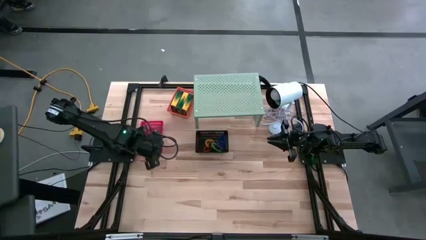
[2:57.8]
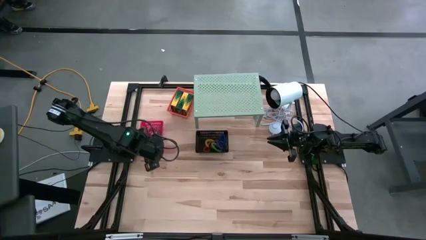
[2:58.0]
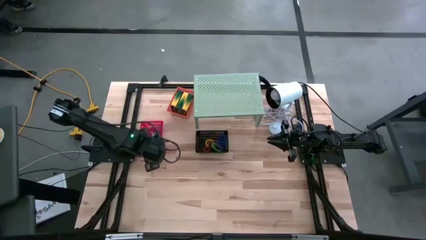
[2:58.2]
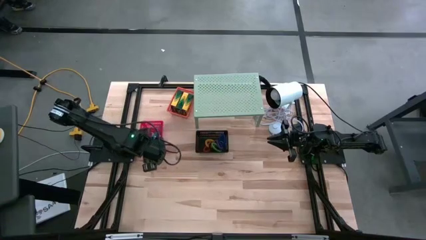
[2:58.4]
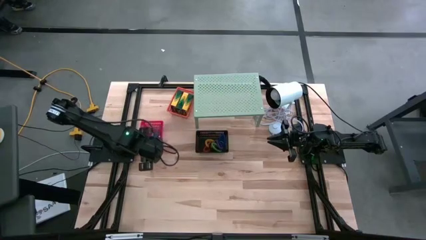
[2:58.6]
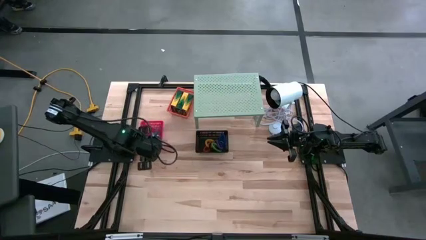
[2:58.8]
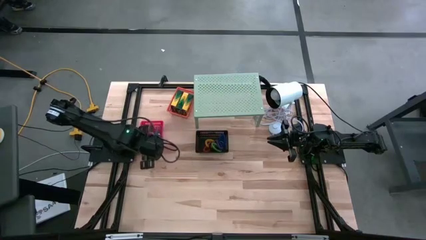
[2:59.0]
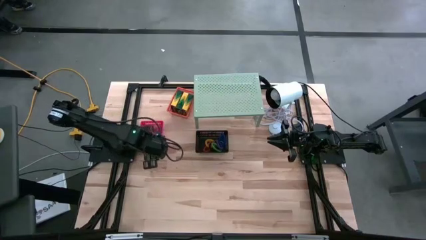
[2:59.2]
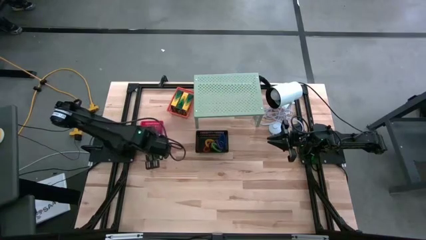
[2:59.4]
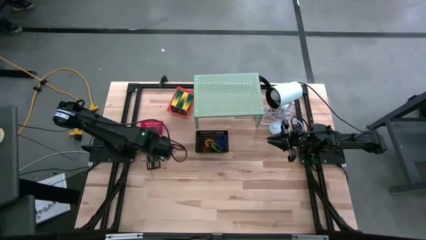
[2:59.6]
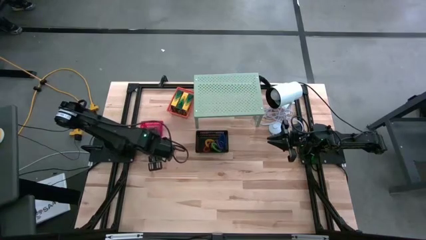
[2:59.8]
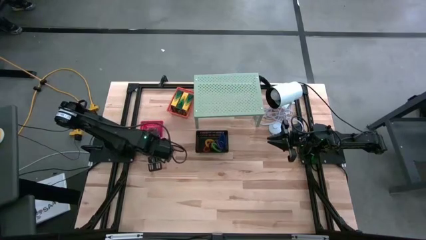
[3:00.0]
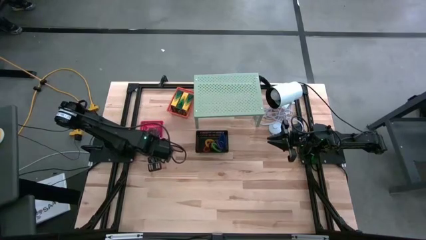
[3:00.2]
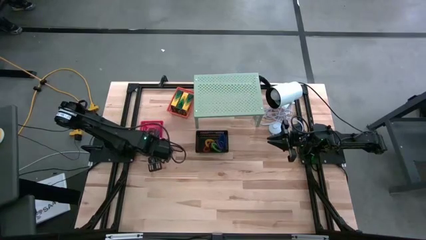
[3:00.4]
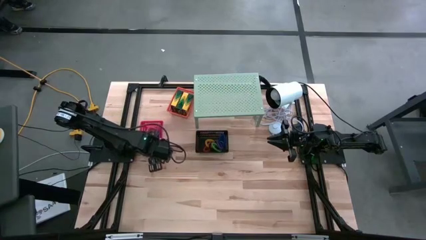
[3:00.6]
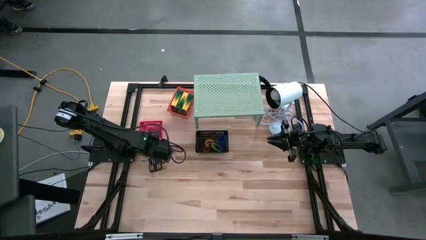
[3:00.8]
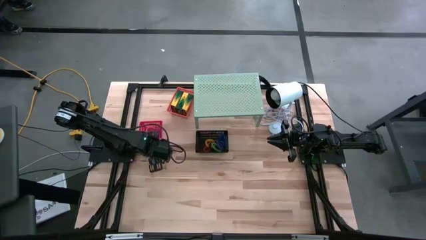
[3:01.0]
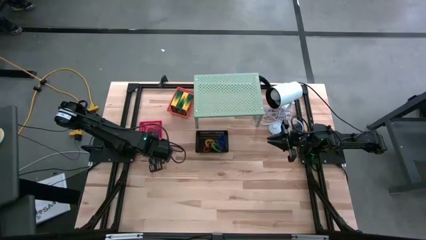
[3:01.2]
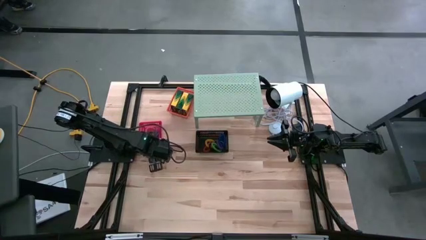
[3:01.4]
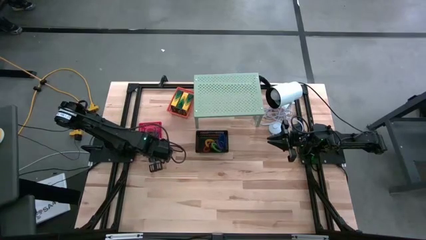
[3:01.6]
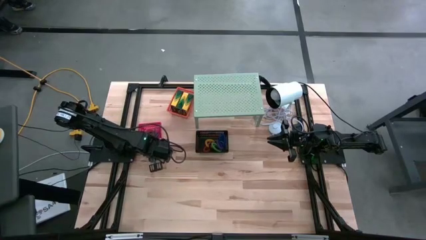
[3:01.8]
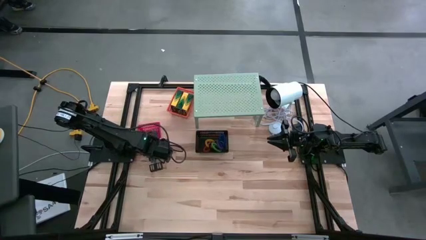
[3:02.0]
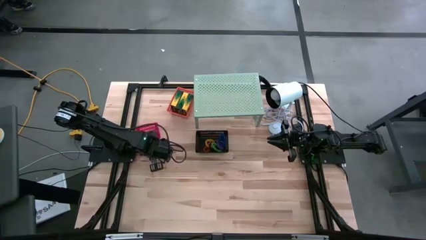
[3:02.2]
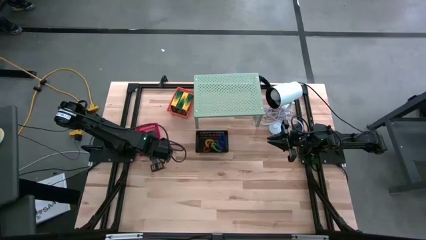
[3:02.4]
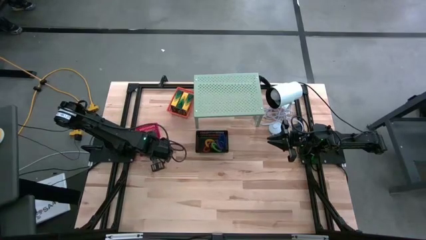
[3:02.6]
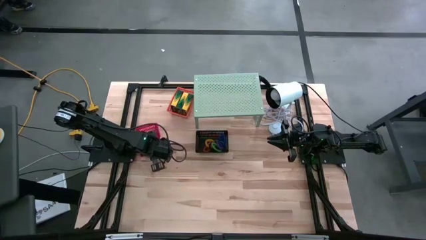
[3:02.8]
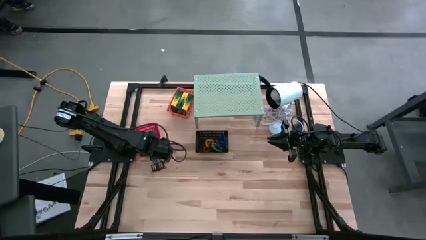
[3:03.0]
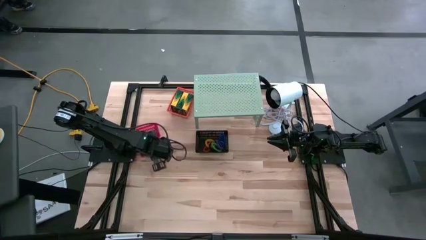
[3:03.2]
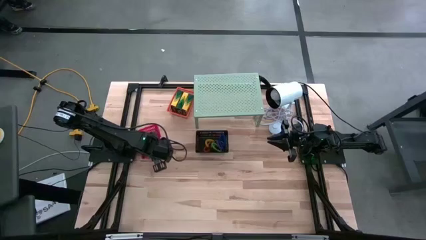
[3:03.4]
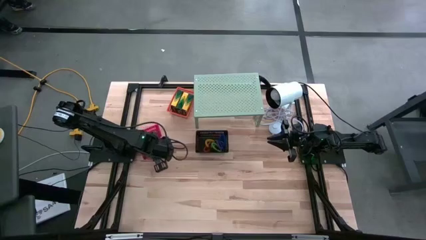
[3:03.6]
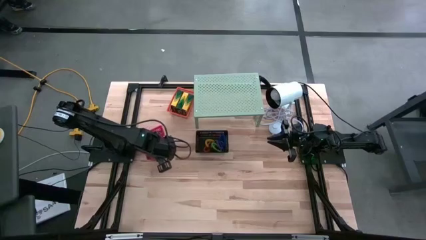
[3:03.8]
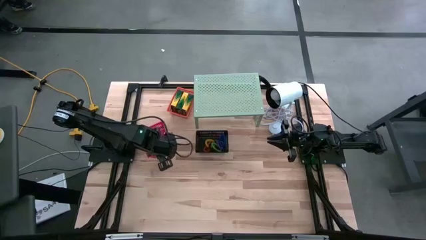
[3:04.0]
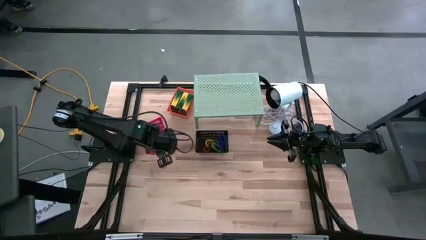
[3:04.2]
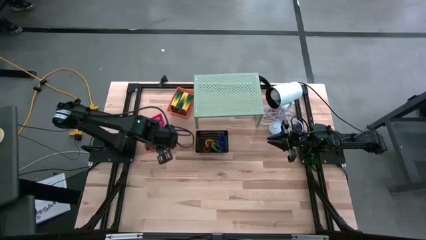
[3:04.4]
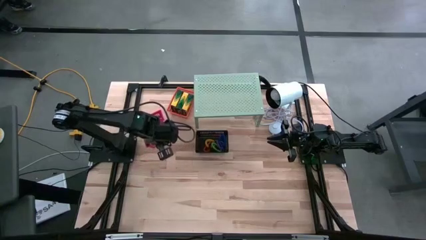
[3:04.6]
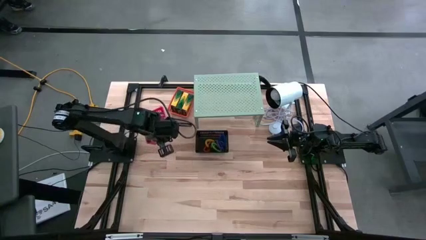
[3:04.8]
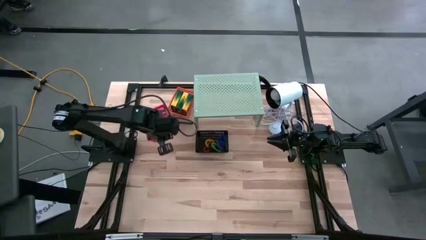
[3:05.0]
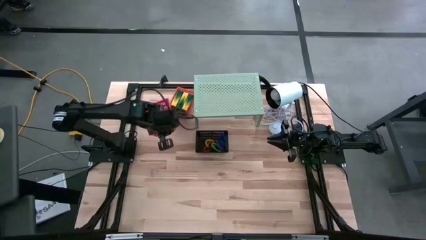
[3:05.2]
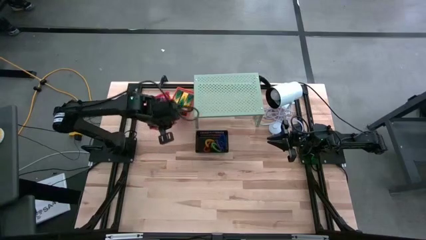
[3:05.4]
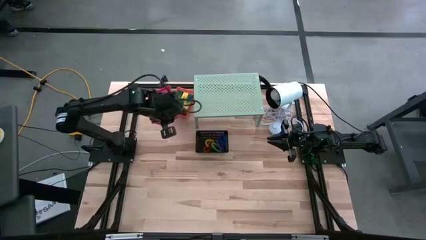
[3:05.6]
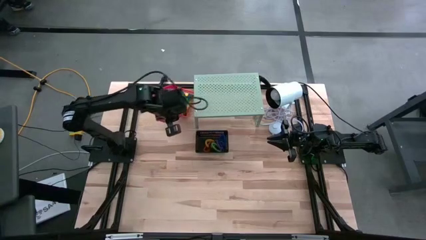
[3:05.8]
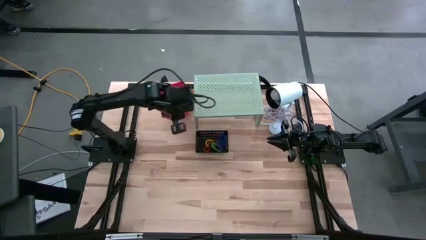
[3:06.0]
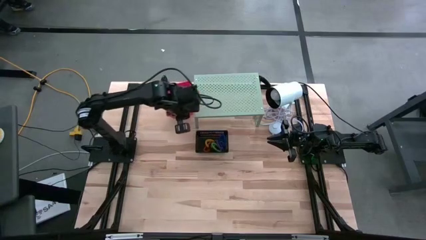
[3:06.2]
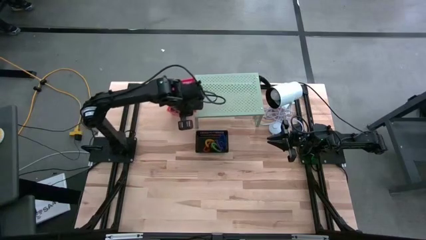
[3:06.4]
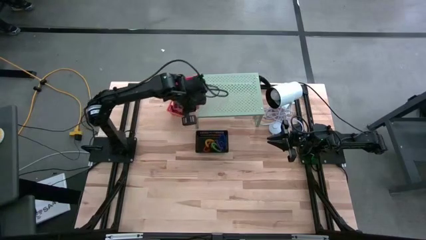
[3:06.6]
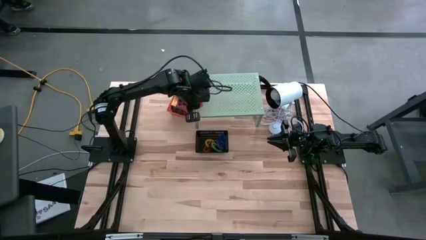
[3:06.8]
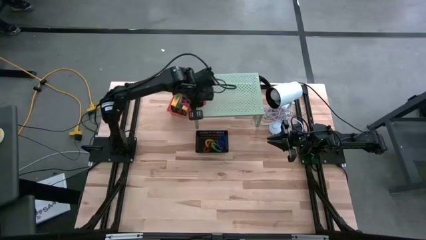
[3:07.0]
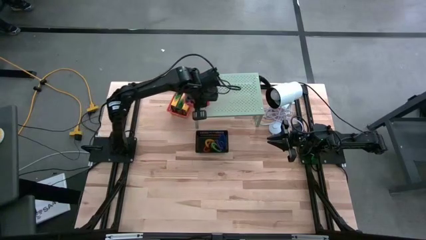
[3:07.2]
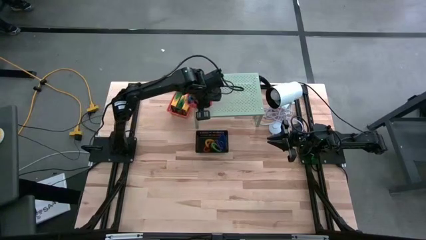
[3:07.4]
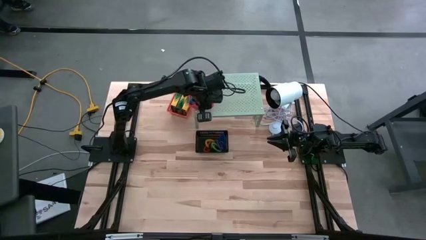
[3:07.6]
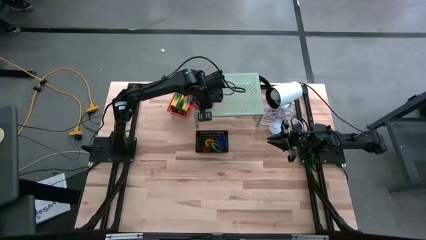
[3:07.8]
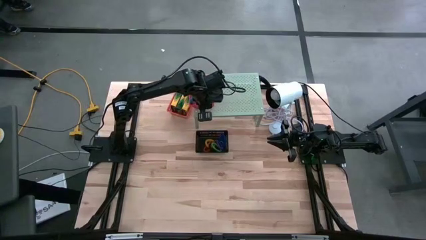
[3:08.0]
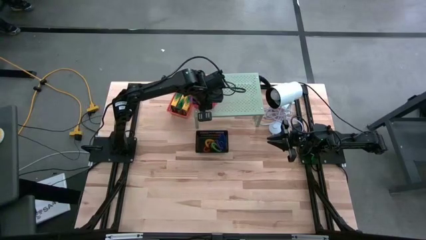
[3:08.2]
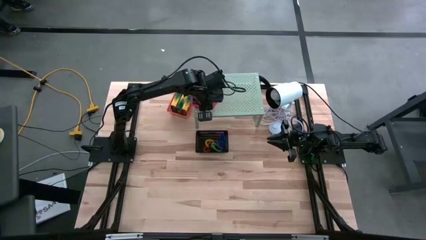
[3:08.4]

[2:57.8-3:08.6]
Task: Pick & Place Office Desk Supplies
Put the red bin with the rubber bands on the shelf

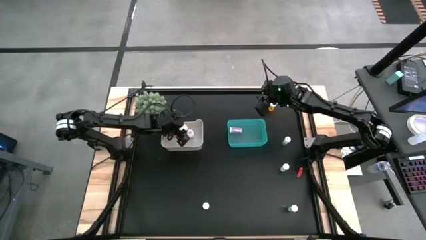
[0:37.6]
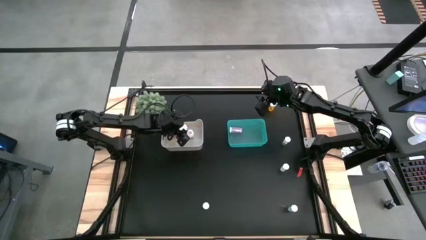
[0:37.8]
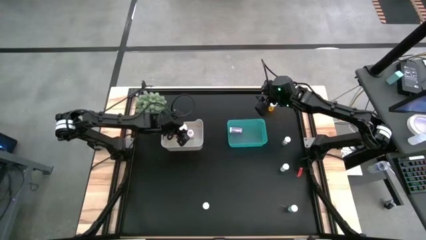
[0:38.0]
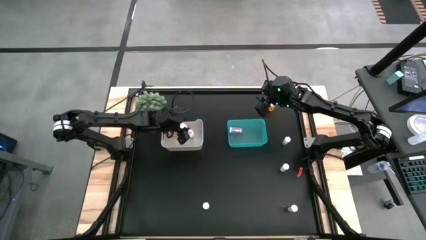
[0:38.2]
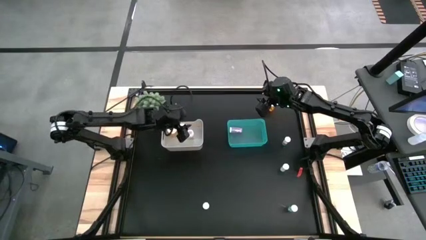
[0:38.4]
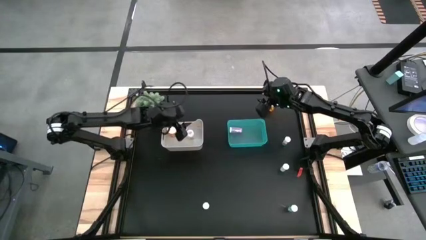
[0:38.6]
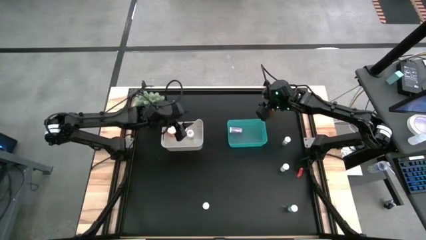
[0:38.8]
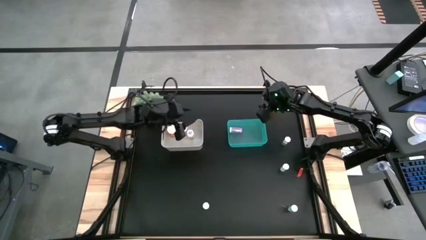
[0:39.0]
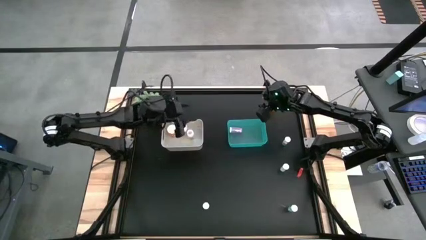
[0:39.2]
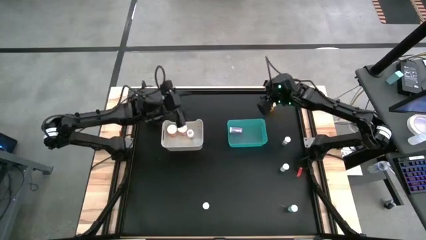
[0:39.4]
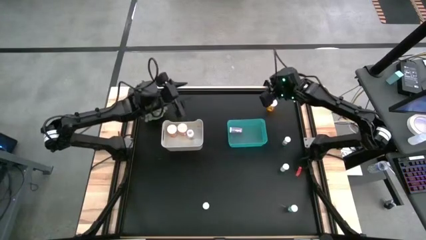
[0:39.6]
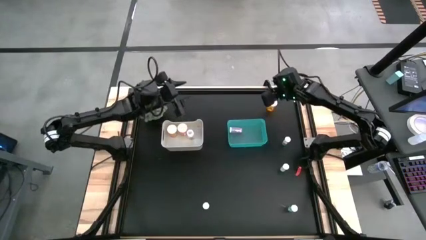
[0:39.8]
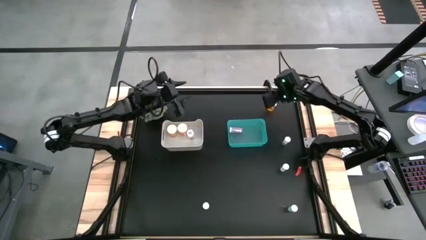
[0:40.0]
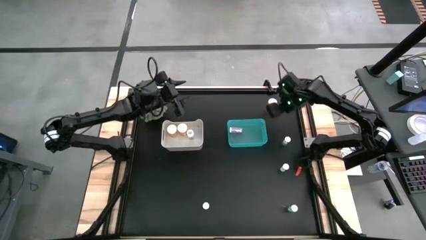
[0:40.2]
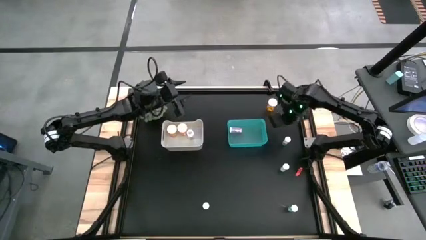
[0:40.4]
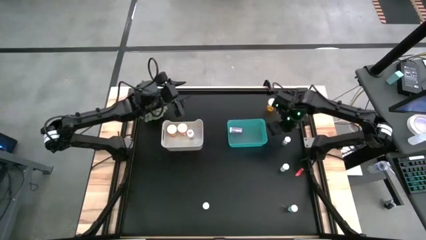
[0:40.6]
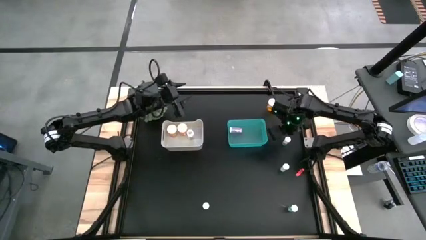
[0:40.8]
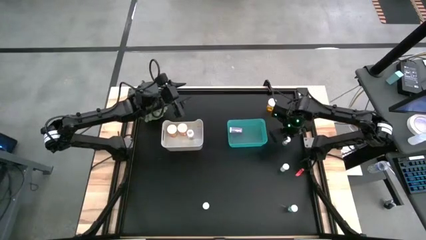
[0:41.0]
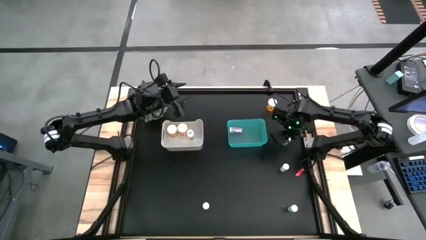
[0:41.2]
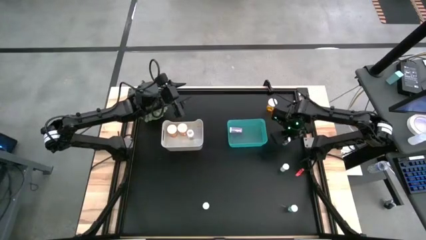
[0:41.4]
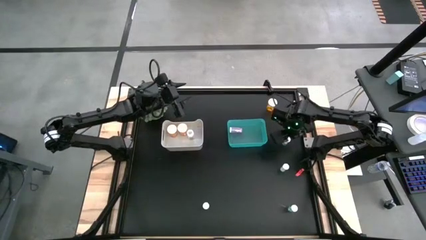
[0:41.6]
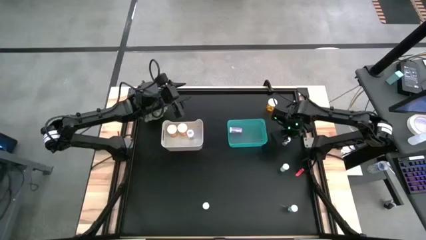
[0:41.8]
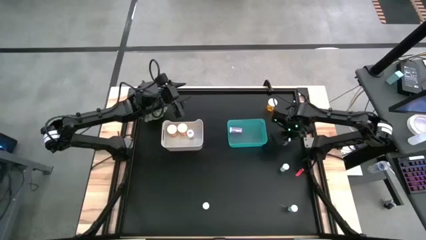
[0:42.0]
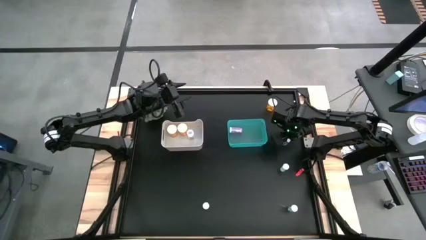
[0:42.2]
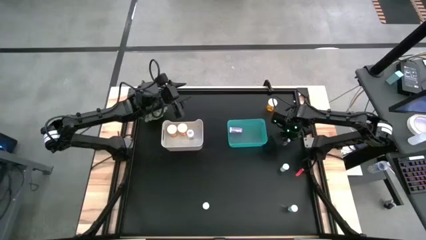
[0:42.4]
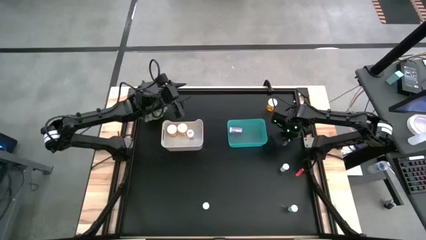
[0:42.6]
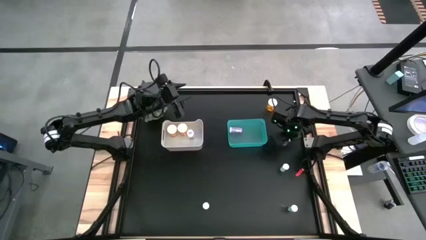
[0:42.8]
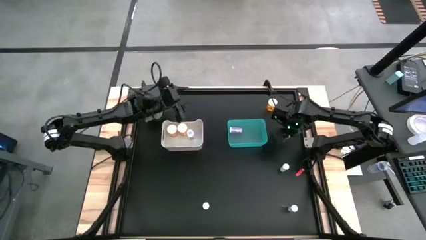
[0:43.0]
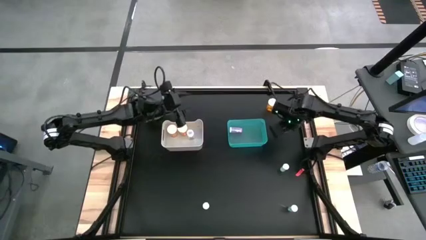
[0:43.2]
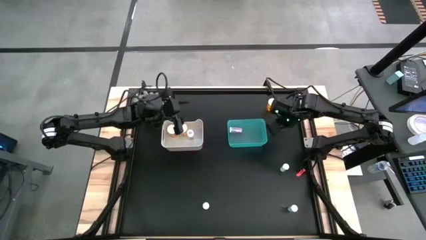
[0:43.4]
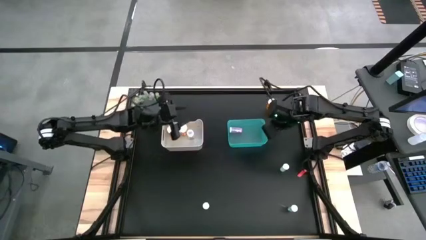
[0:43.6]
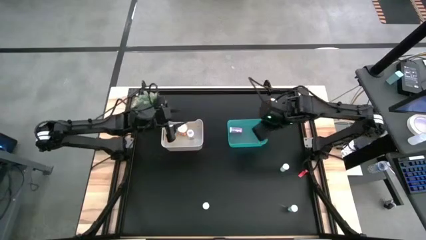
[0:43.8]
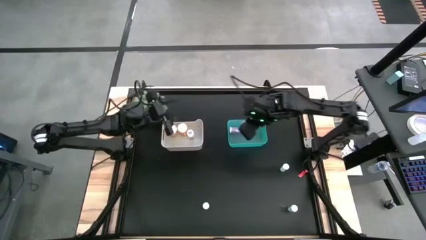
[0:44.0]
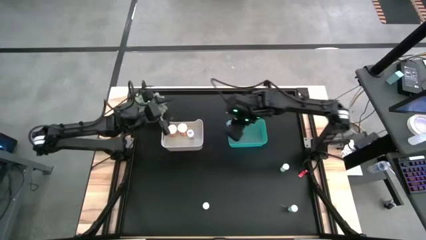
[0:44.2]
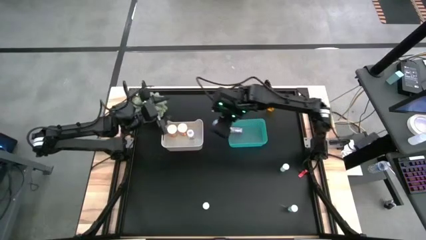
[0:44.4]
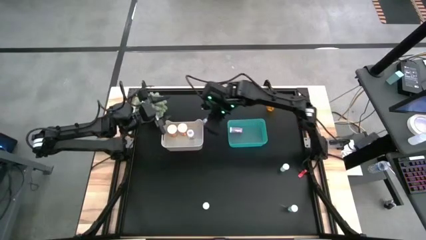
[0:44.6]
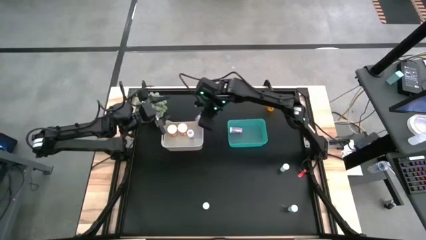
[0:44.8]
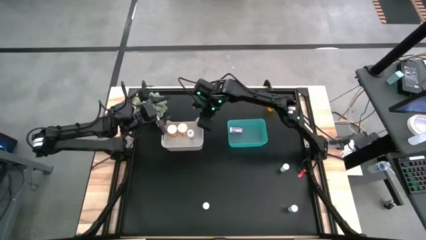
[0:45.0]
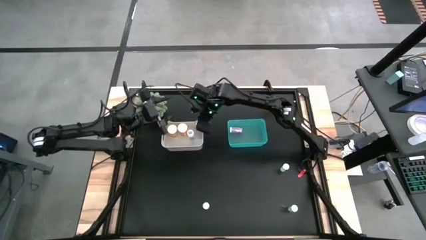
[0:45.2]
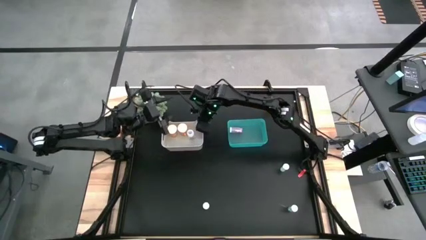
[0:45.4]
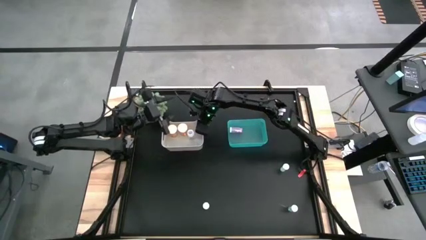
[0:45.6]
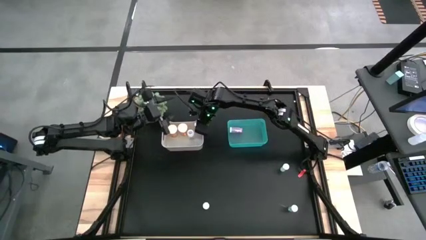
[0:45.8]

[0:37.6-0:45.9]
Task: Pick and place medicine bottles into bin by pill shape (circle, oval)
Put the top small green capsule bottle into the white bin
